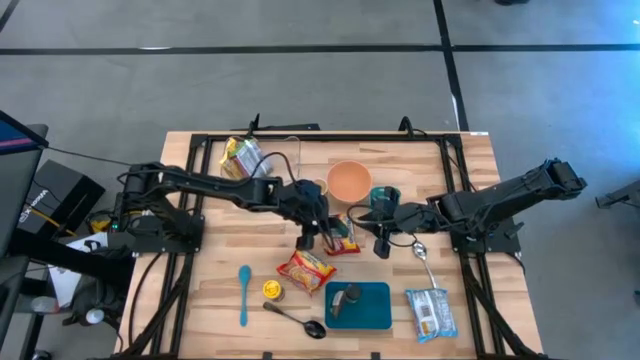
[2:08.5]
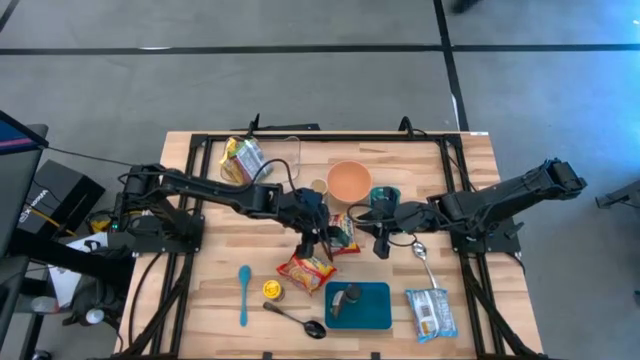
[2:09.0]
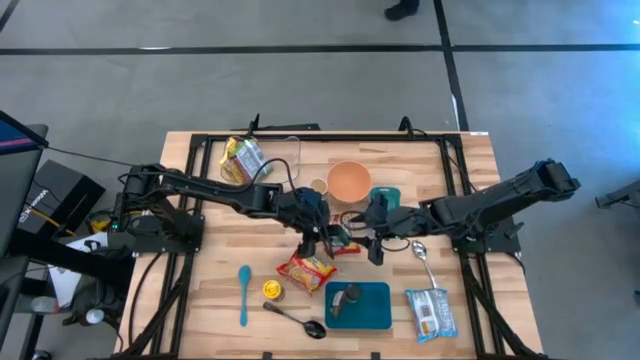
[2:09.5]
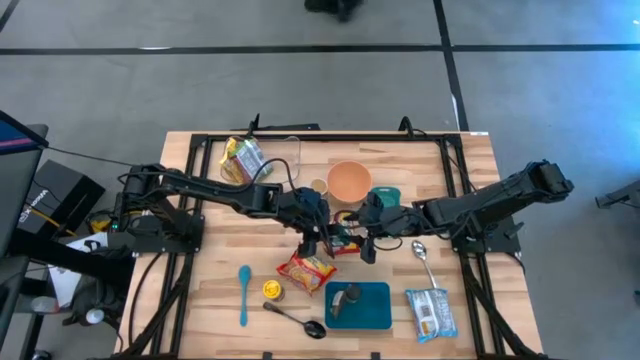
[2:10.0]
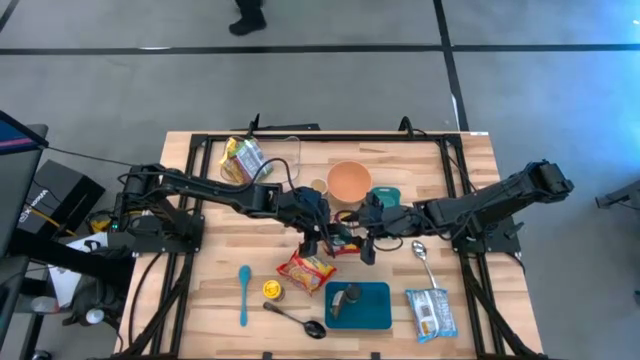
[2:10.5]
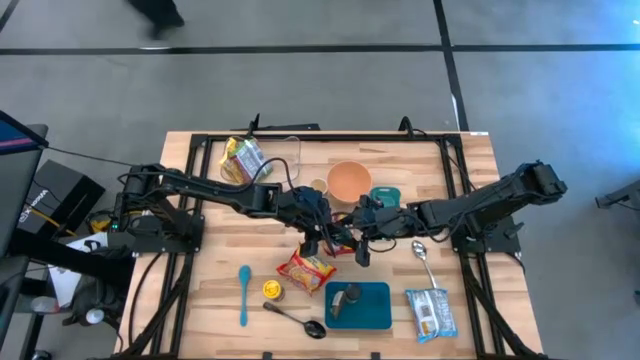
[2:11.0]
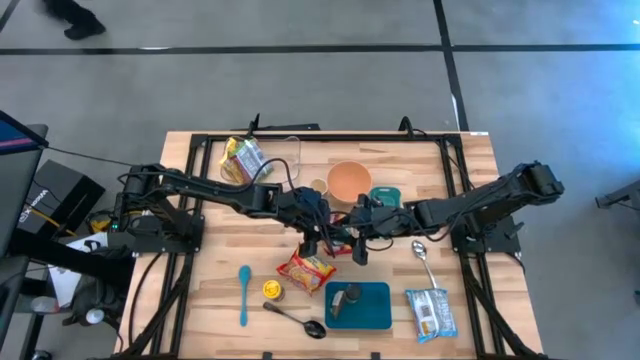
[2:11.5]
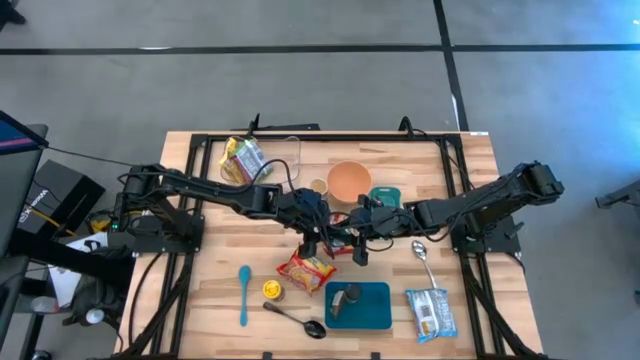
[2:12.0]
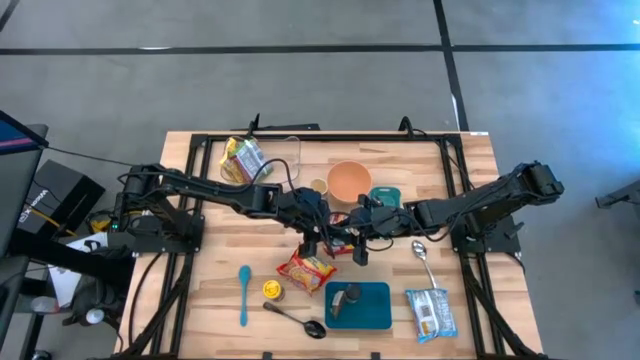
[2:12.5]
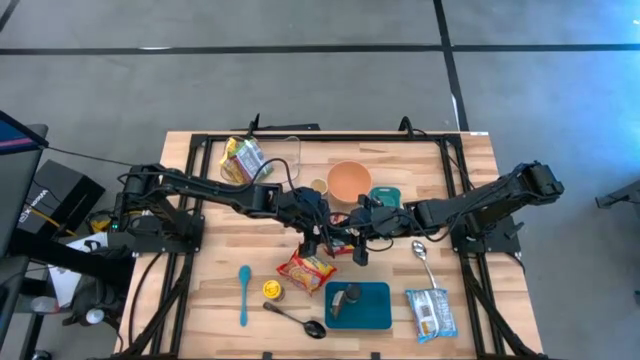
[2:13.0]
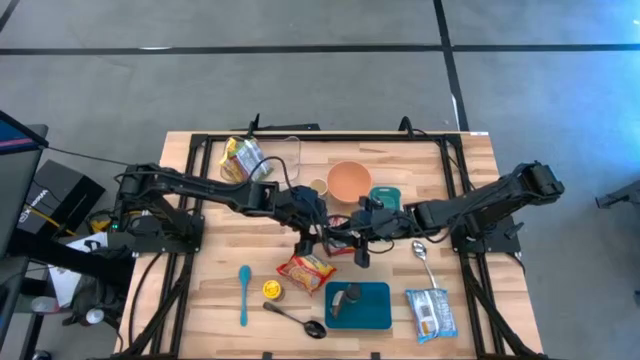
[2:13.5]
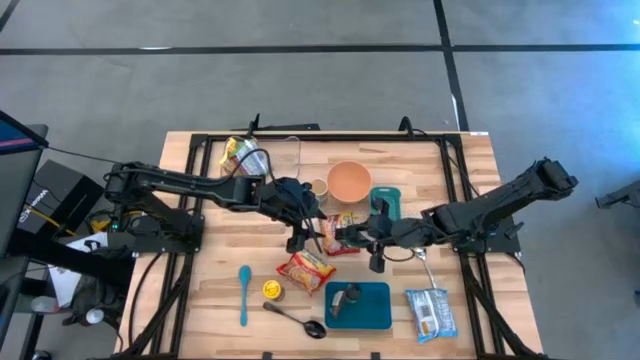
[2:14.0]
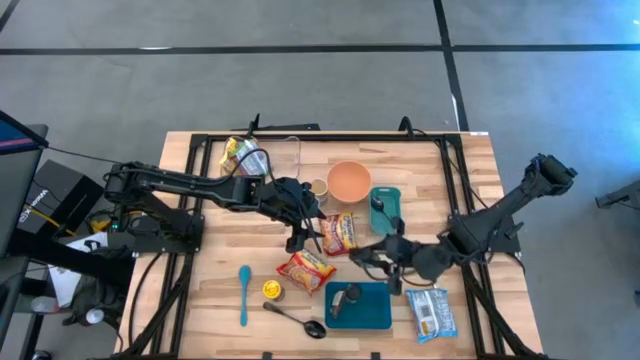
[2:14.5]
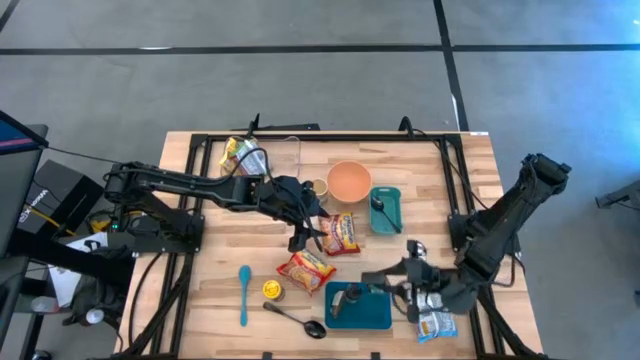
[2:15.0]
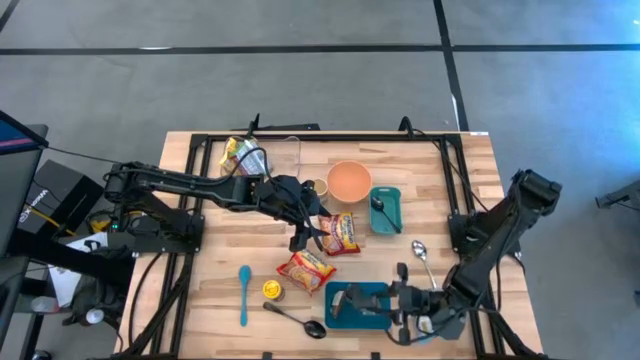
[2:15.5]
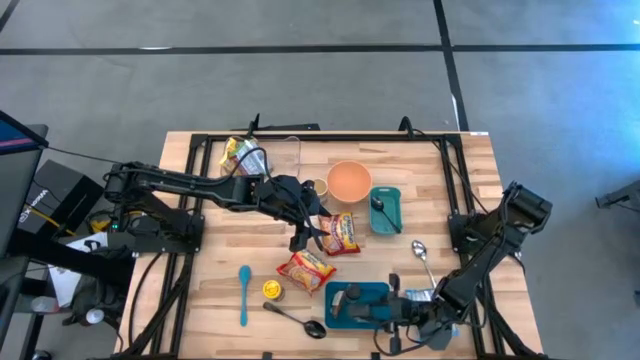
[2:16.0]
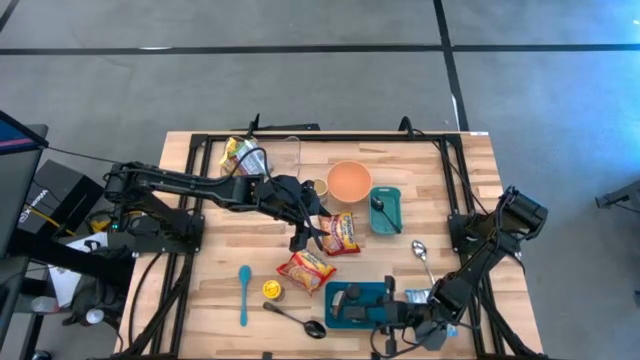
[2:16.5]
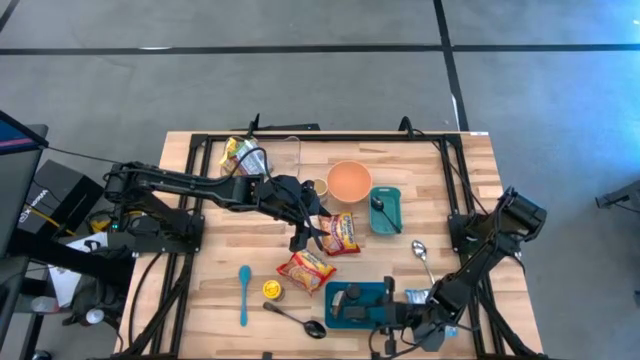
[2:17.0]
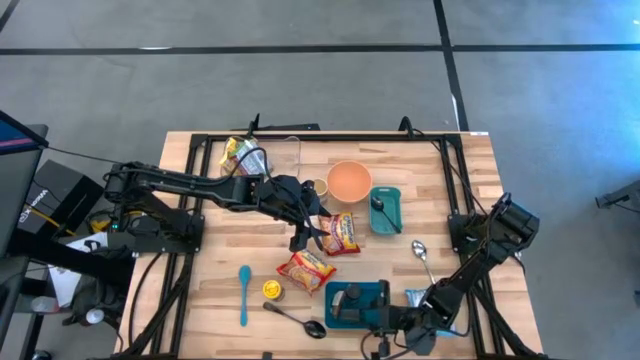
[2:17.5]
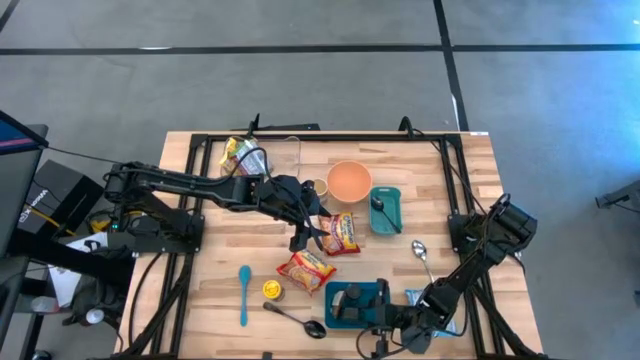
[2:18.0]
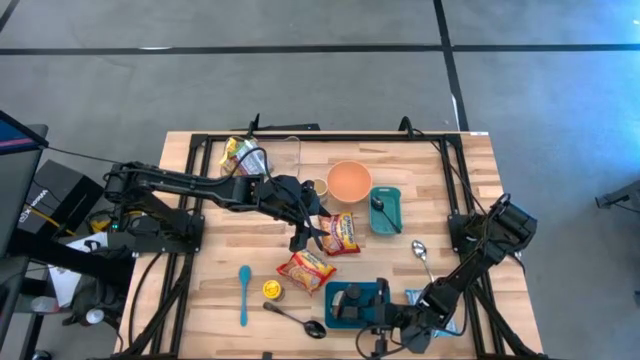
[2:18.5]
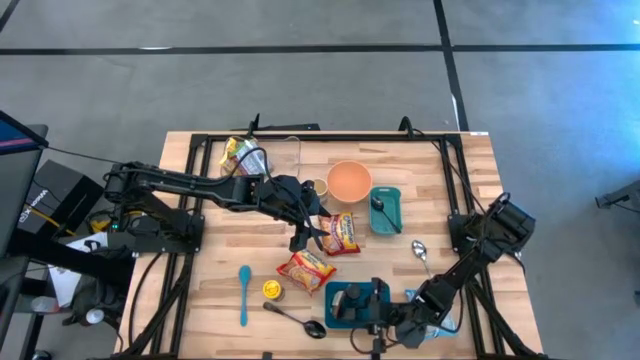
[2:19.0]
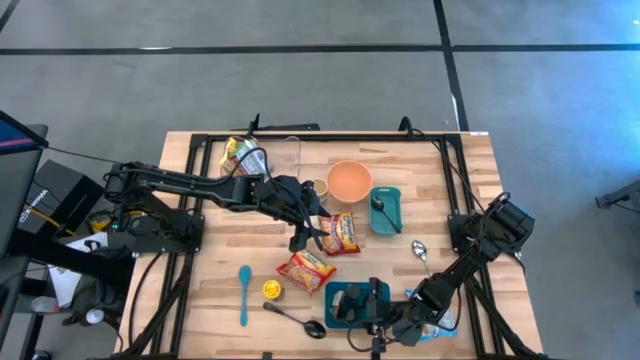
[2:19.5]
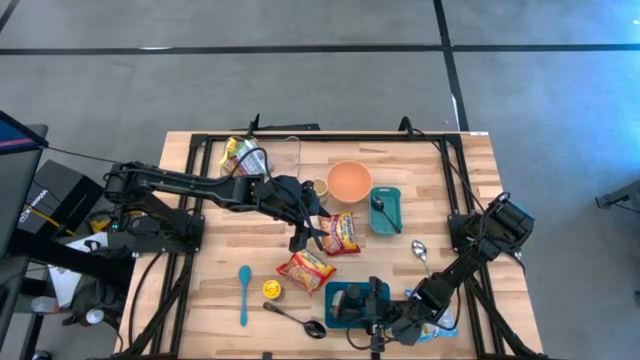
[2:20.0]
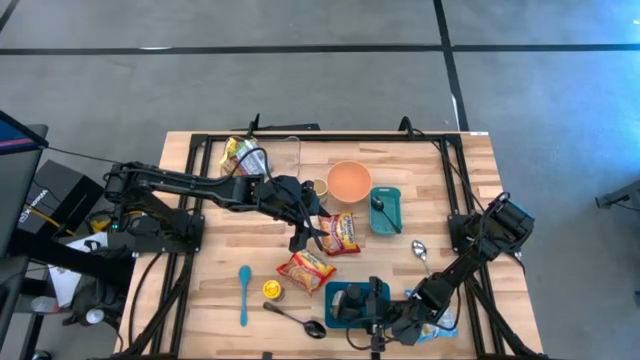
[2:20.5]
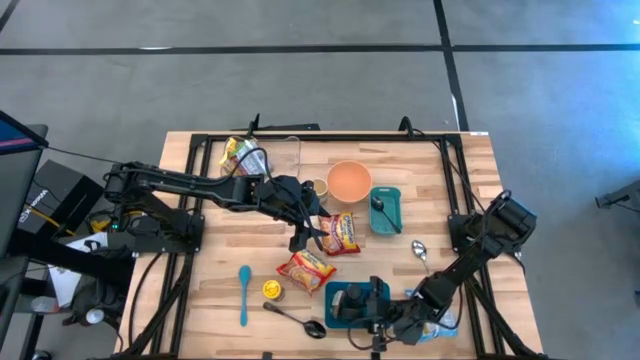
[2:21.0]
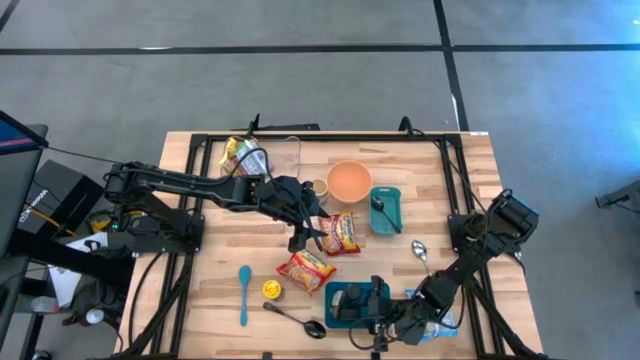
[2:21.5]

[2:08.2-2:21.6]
Task: Pick & Place Food Item
Put the black seasoning can into the blue bin

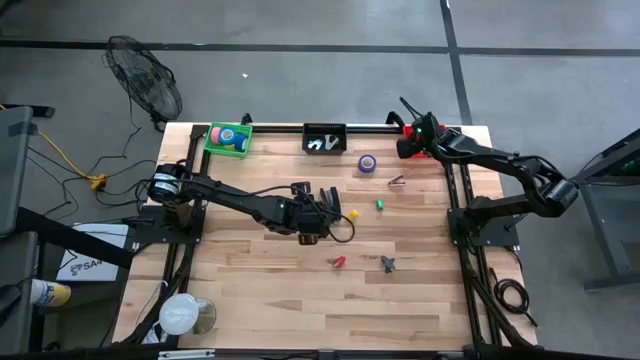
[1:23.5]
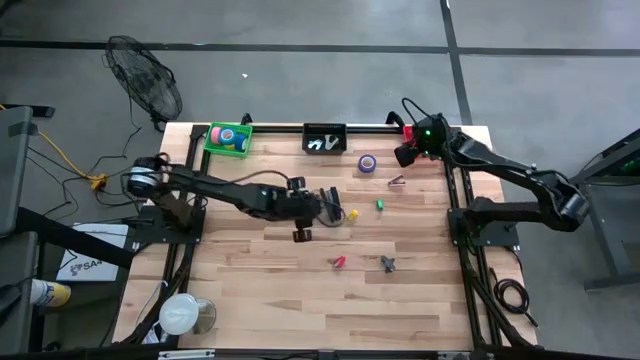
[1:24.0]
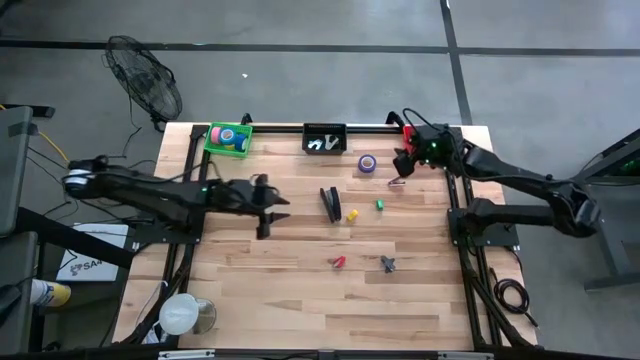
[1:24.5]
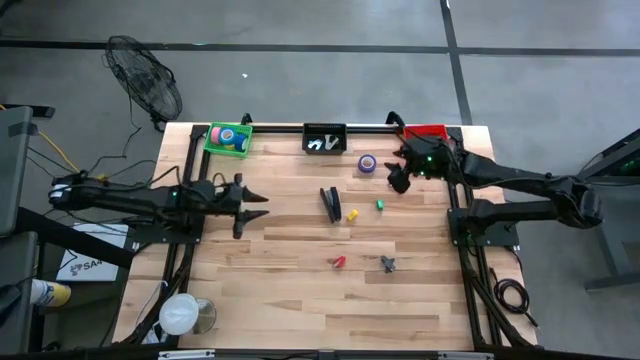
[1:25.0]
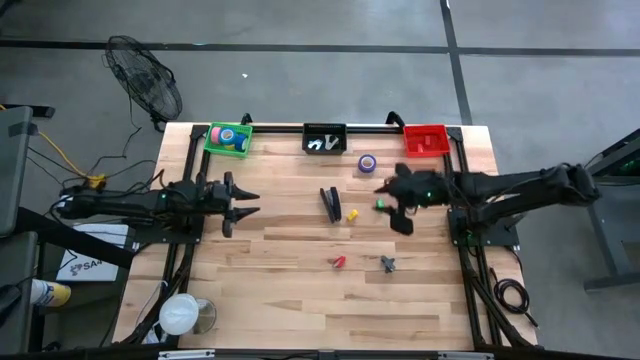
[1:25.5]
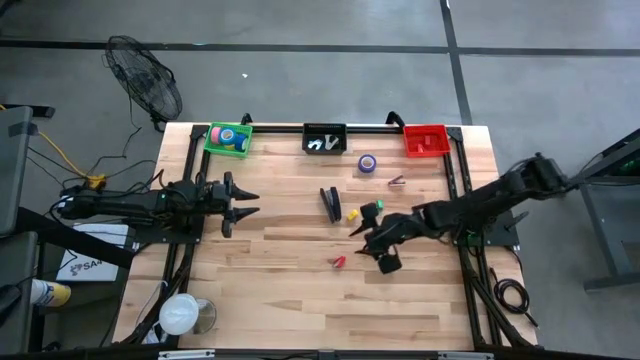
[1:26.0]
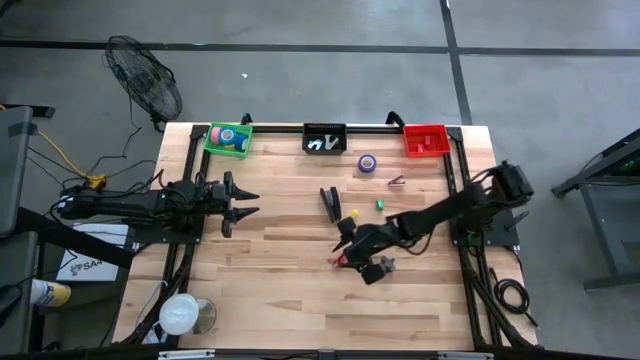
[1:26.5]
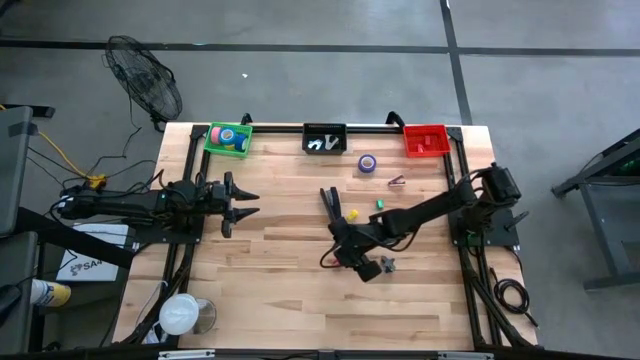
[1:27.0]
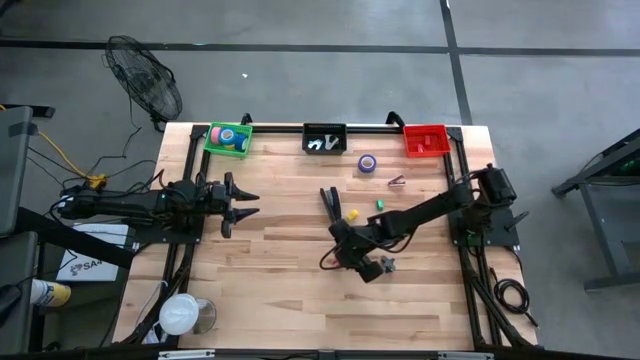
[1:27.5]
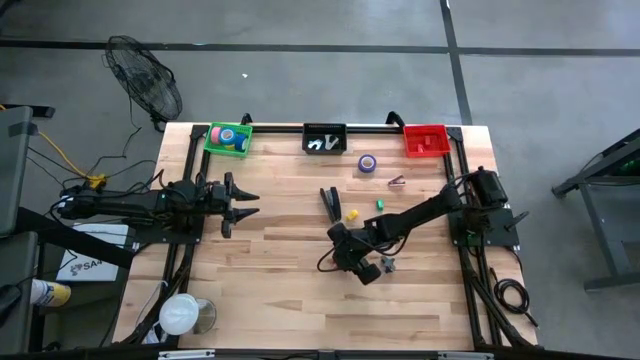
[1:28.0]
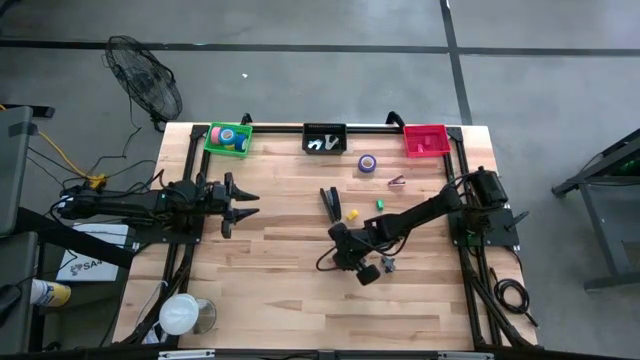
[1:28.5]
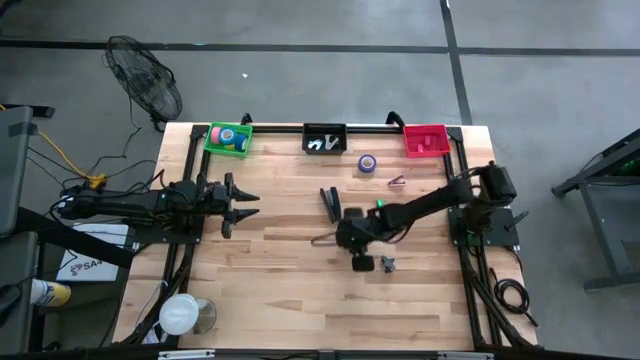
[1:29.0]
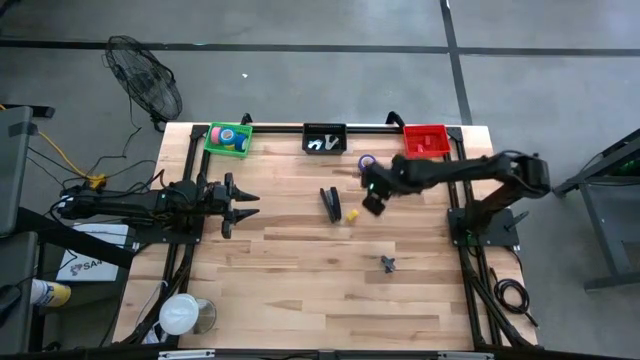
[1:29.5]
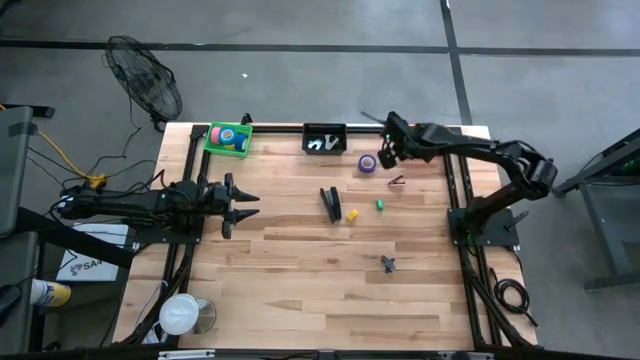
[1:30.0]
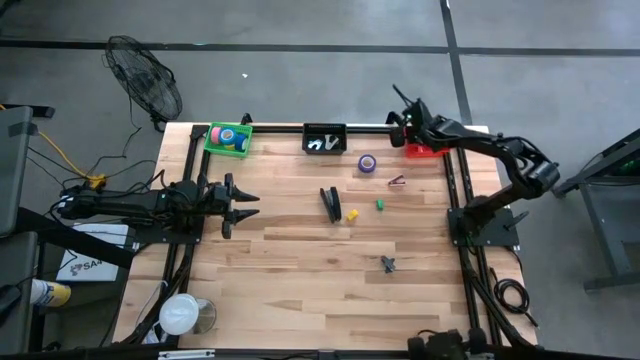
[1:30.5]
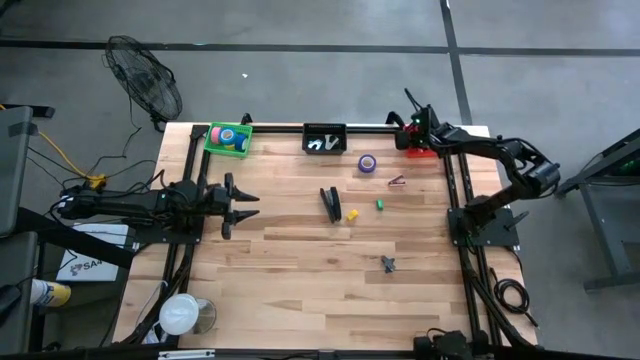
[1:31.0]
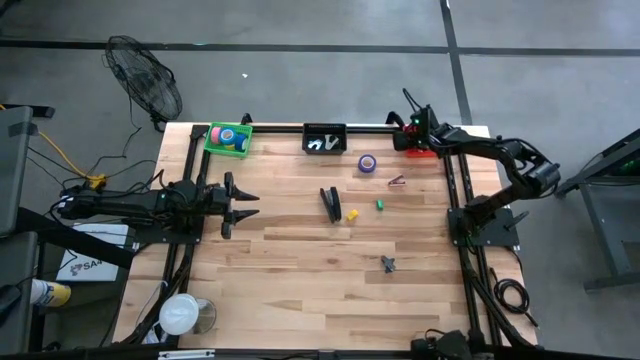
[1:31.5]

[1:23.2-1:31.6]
Task: Pick and place Stapler, Stapler remover, tape
Put the red stapler in the red bin
